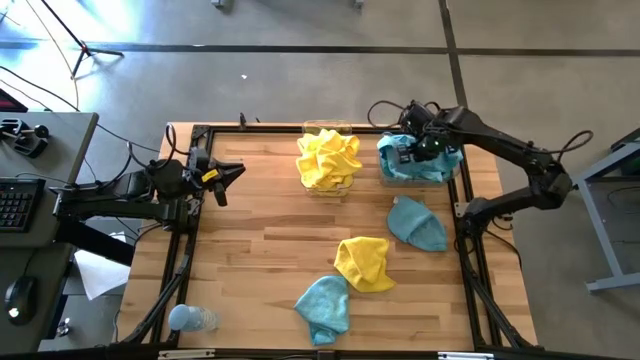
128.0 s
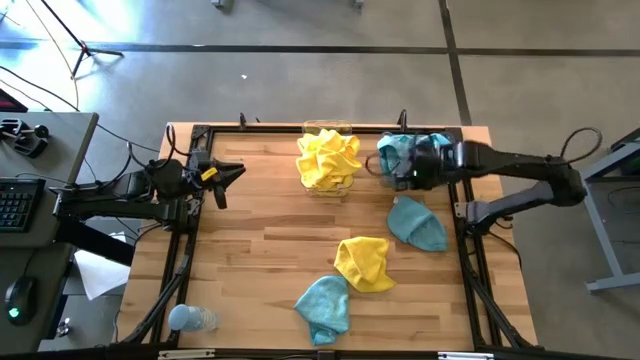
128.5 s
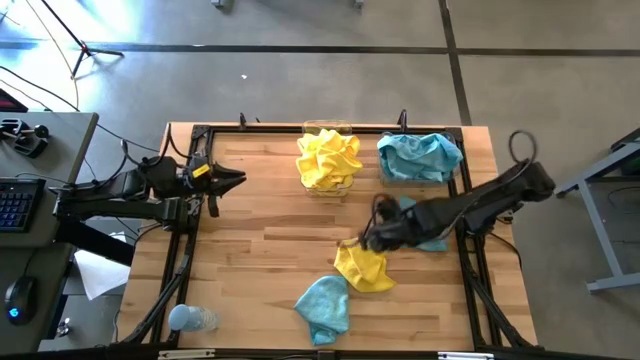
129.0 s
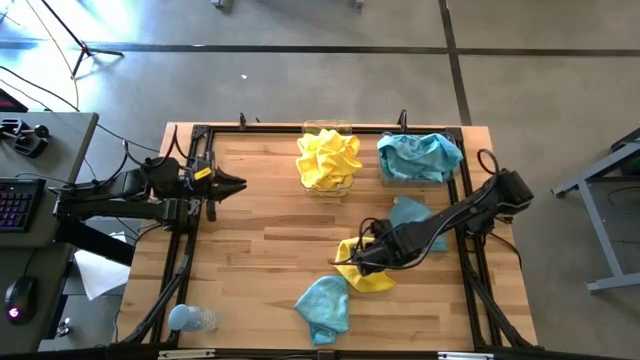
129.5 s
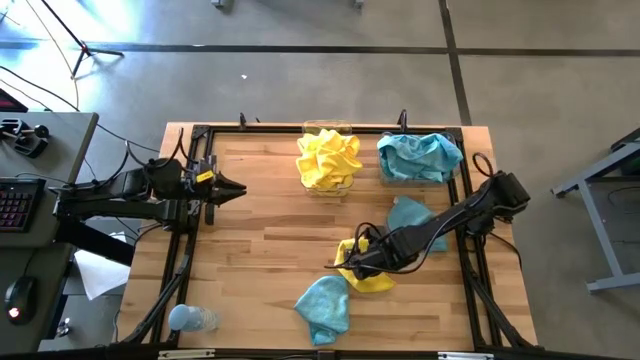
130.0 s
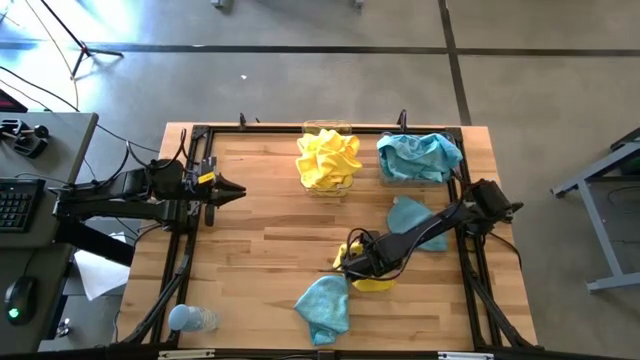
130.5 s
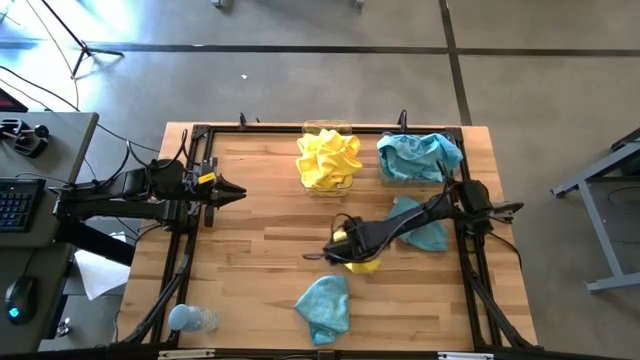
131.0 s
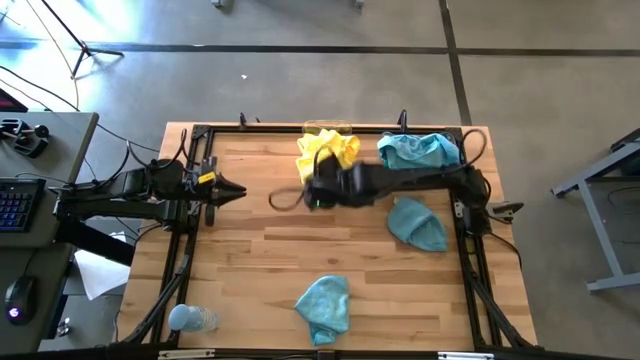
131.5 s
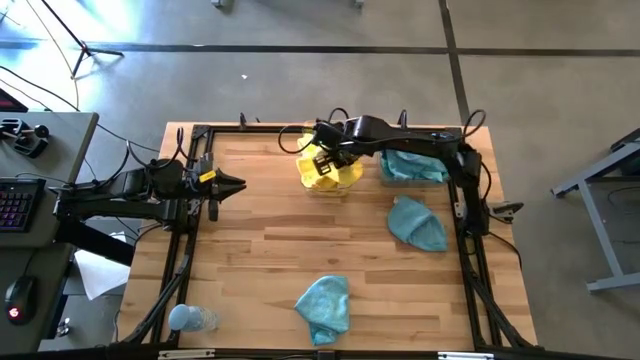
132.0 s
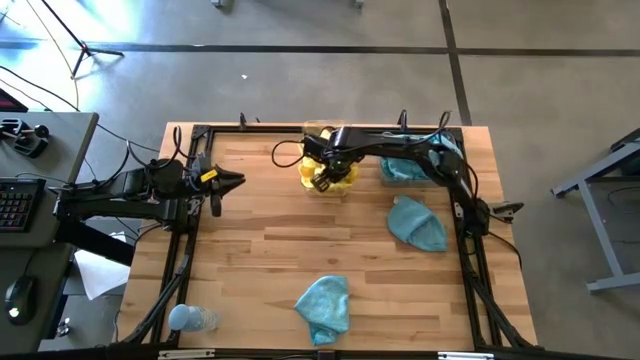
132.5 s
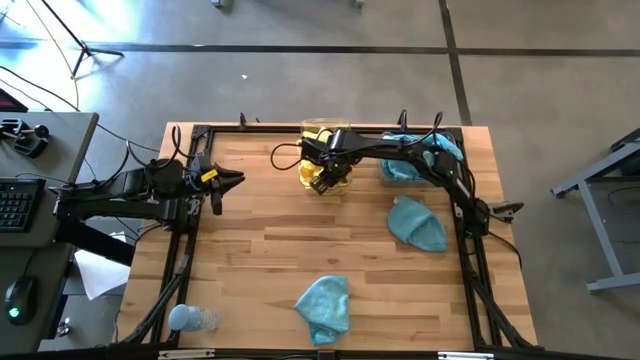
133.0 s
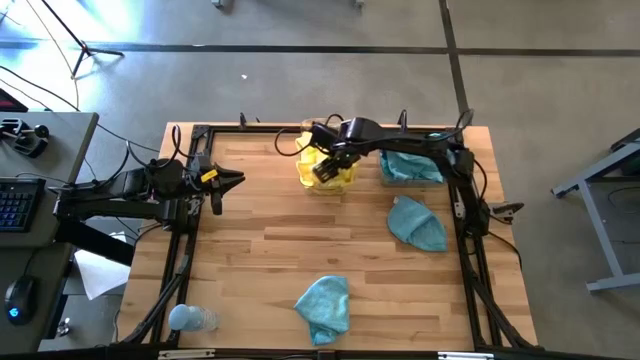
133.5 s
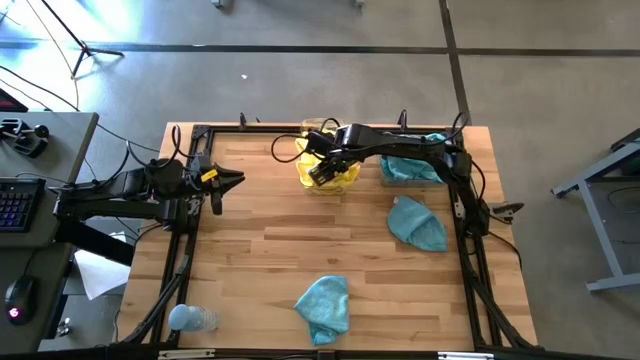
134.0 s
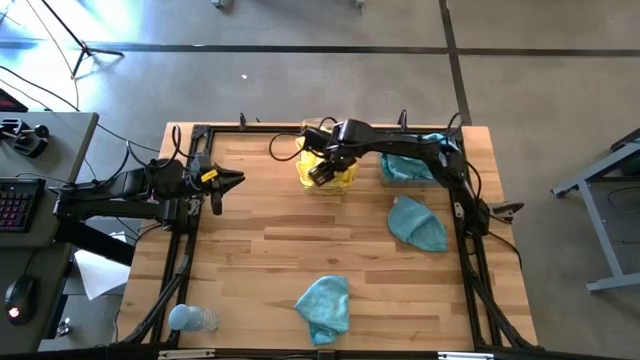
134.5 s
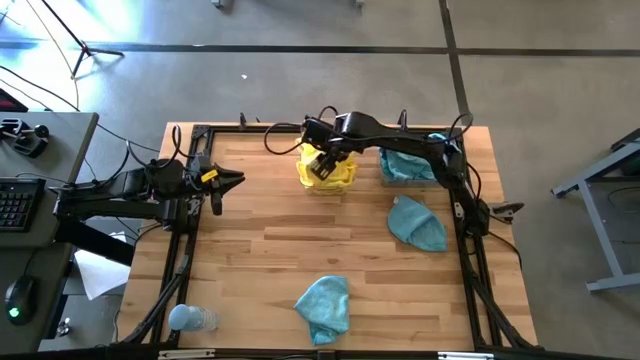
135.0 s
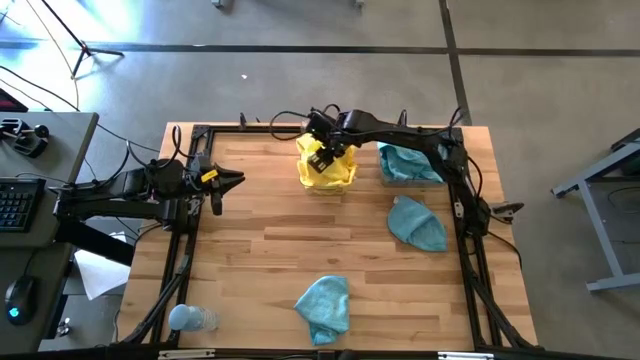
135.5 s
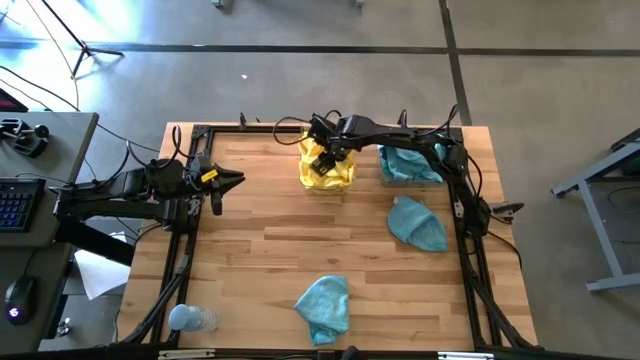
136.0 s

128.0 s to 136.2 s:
Task: Sort microfiber towel by color & place in baskets
Put the yellow towel into the left transparent bin

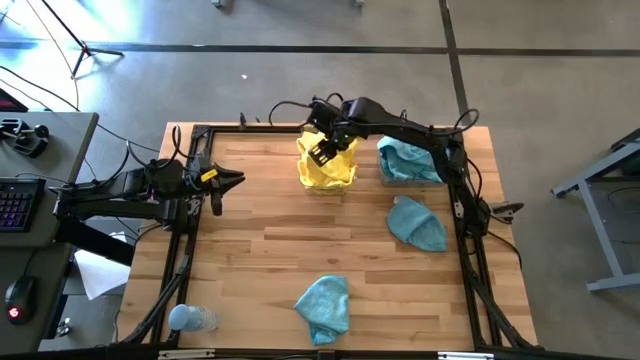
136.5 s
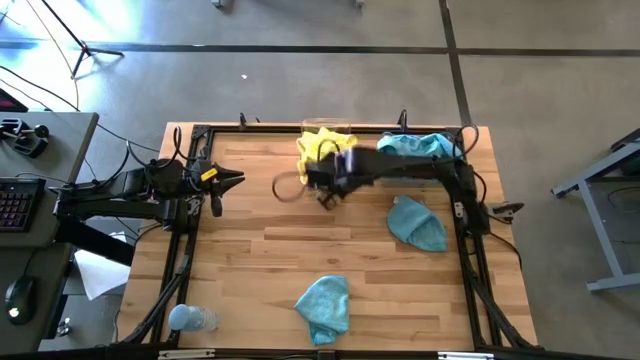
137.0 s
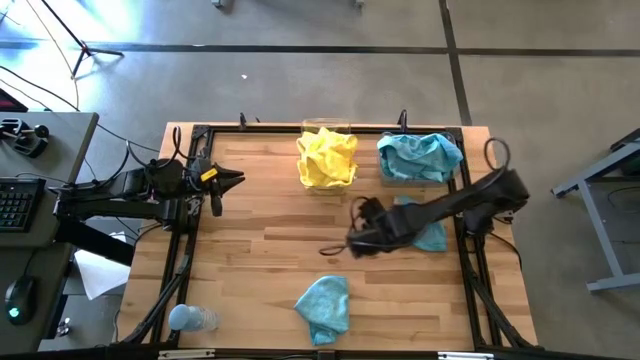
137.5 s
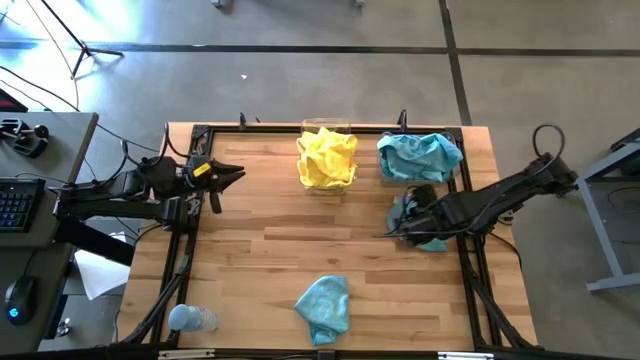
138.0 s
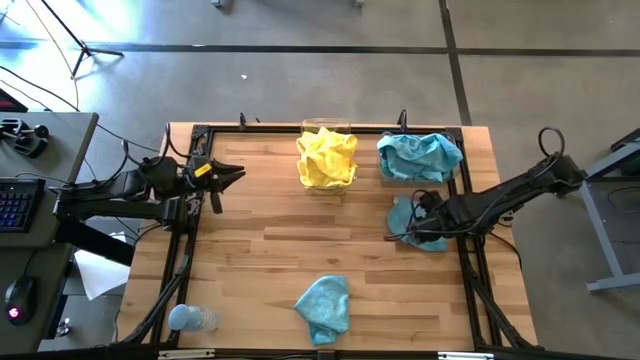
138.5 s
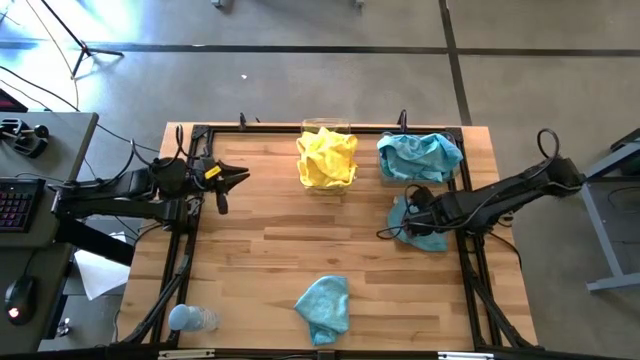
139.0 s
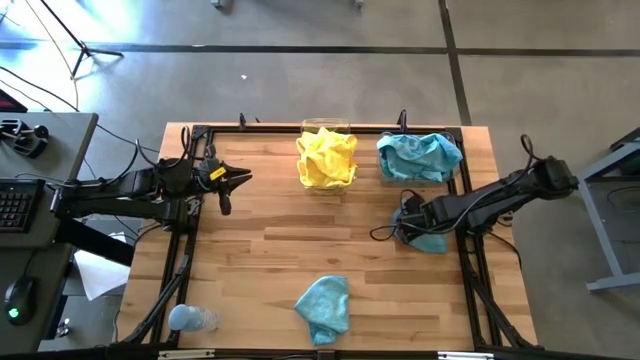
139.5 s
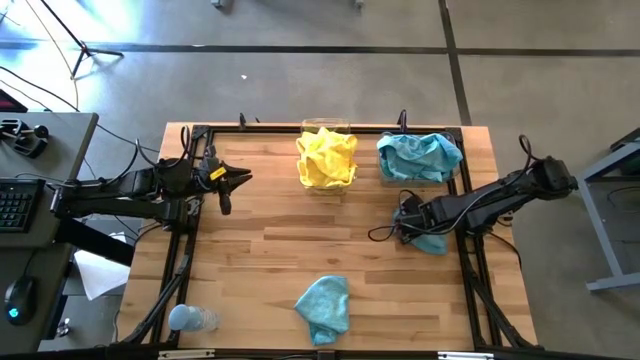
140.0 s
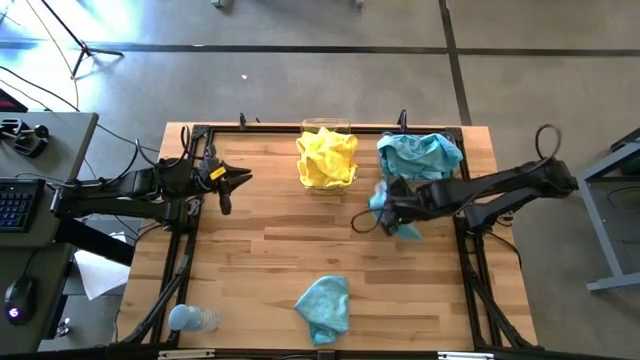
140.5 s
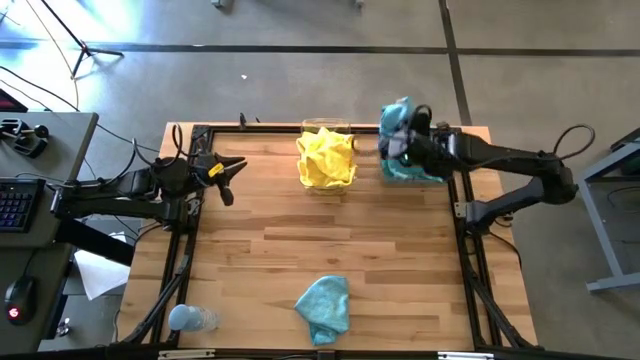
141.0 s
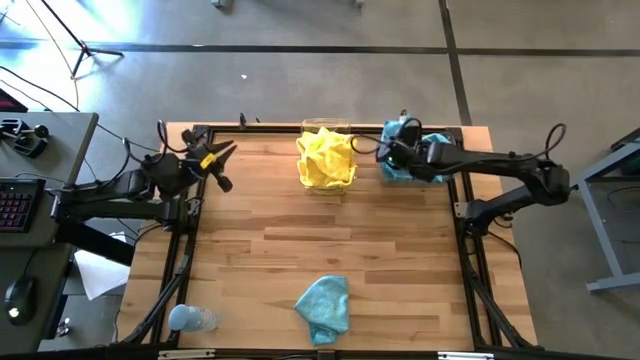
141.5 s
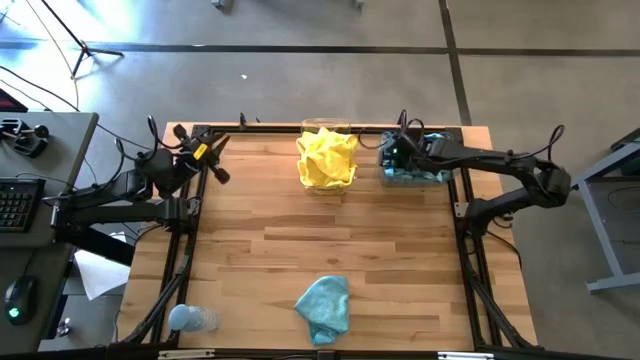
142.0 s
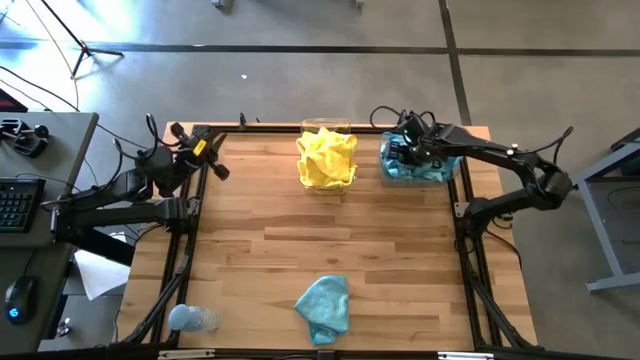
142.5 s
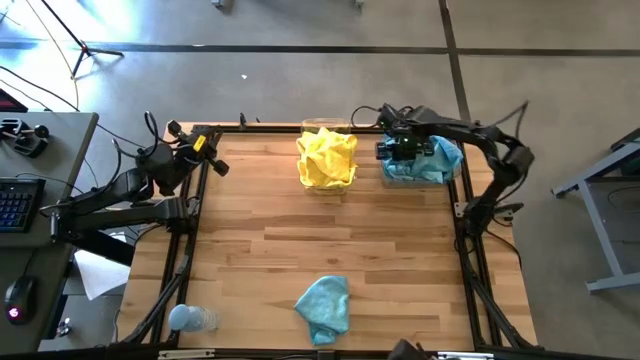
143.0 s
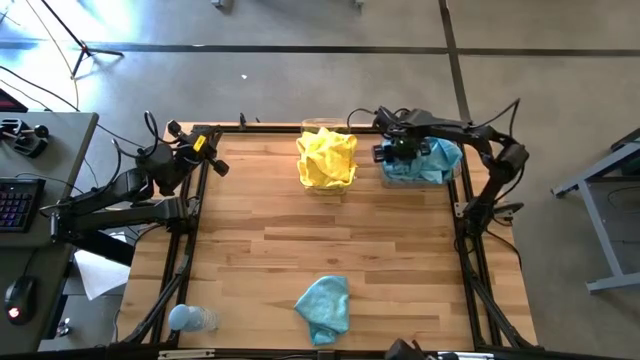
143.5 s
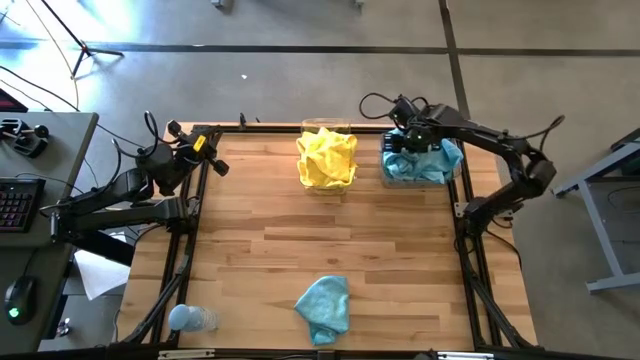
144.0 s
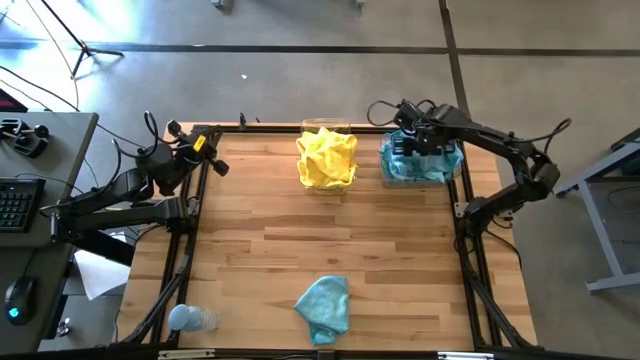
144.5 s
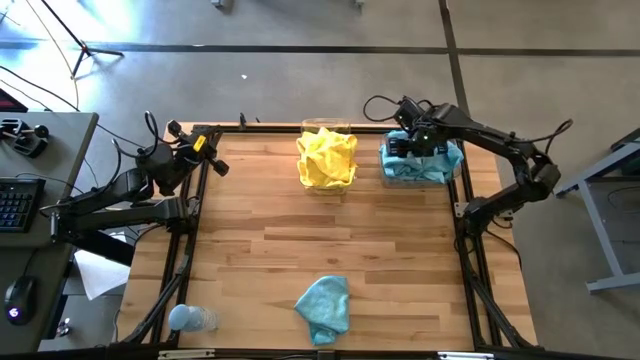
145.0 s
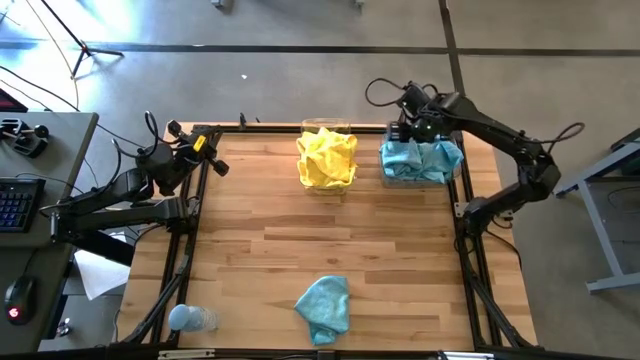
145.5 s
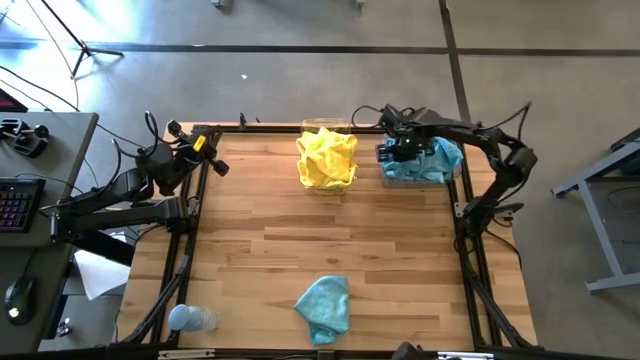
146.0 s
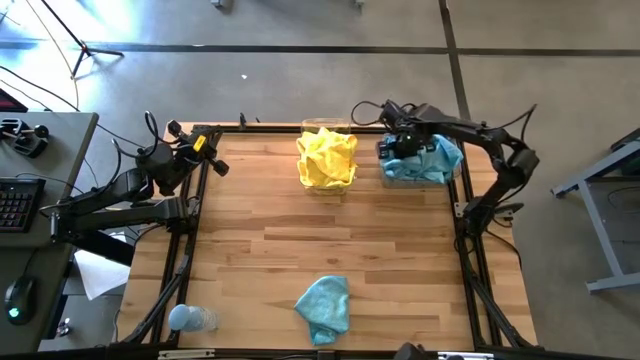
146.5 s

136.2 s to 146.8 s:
Put the blue towel into the right transparent bin

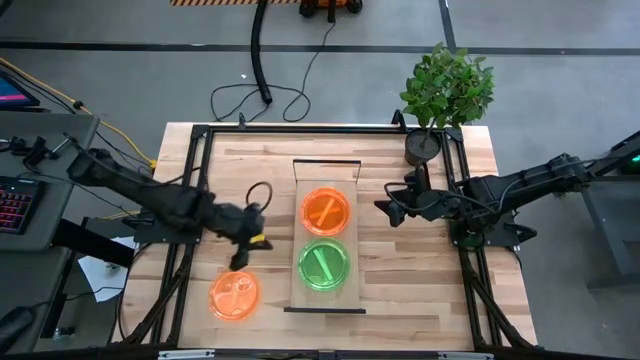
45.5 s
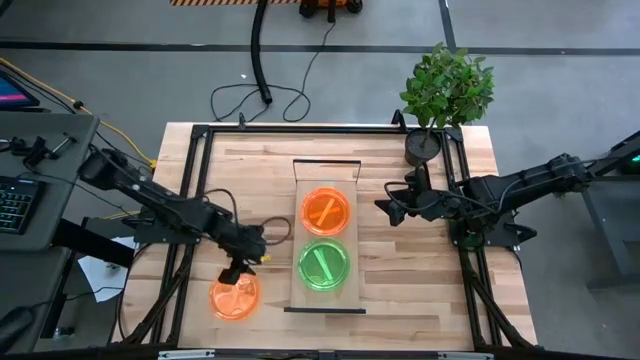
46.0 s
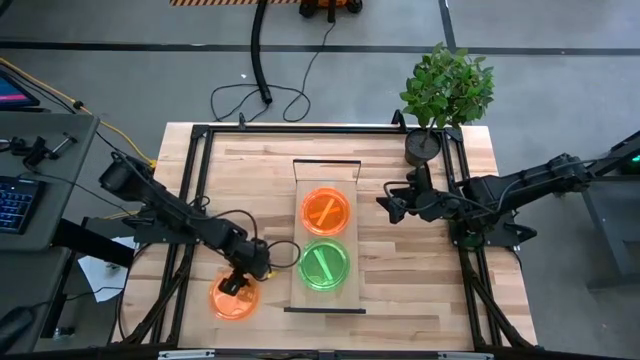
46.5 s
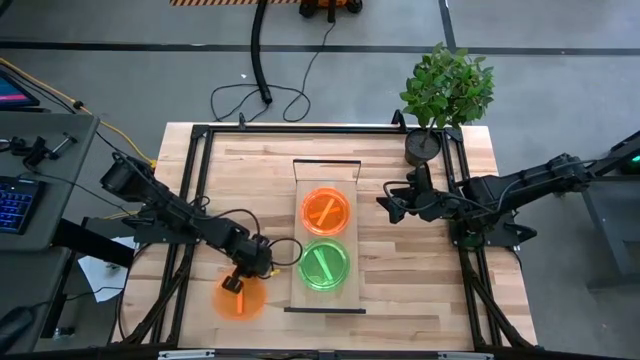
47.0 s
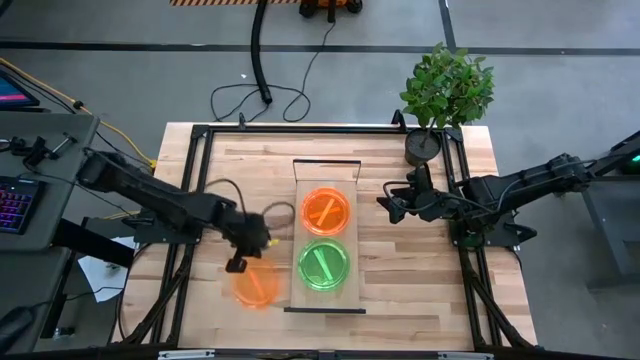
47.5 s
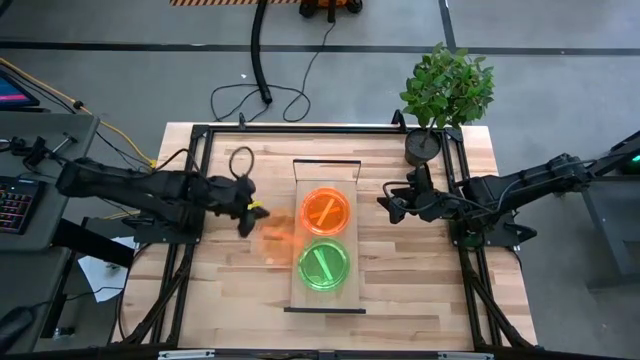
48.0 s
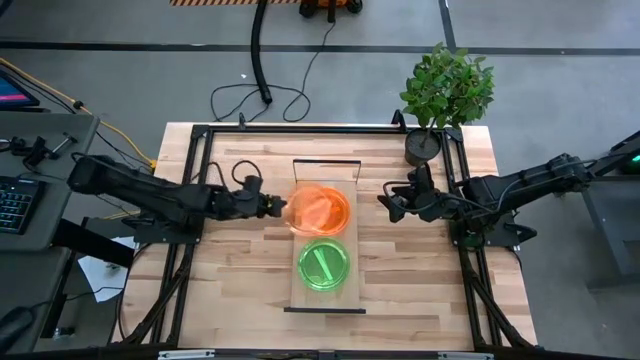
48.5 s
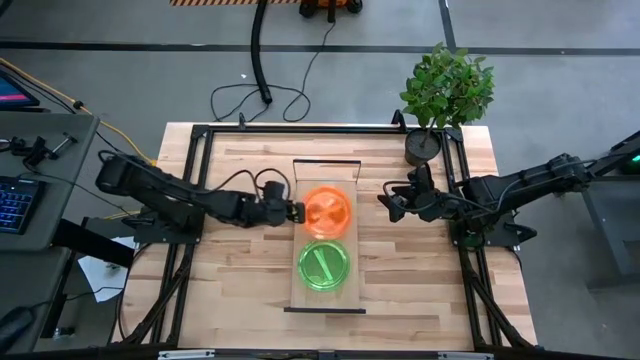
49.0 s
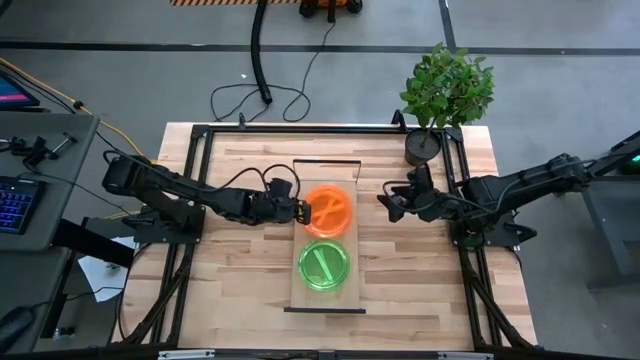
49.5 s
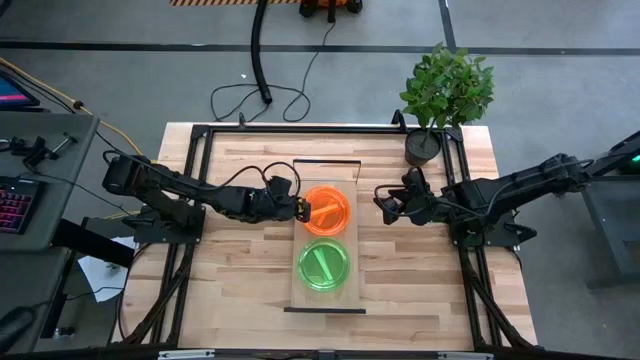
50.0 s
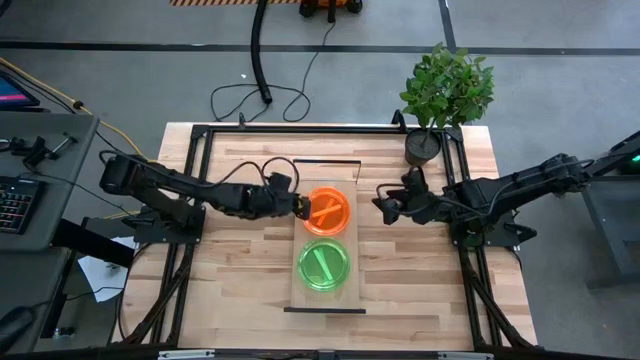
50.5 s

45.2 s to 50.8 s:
Task: Place and stack plates onto a shelf
Stack the orange plate on top of the orange plate
